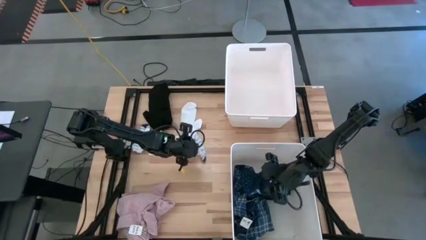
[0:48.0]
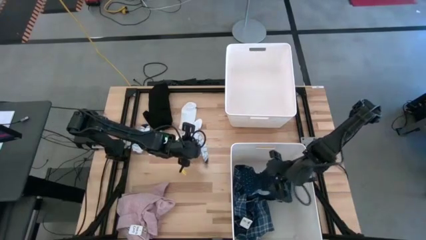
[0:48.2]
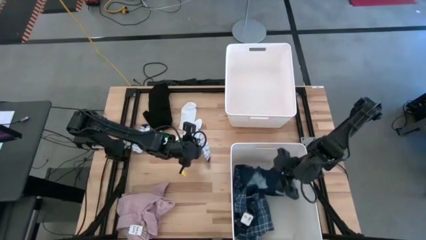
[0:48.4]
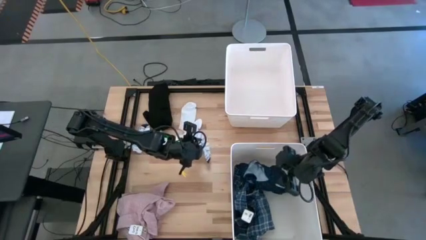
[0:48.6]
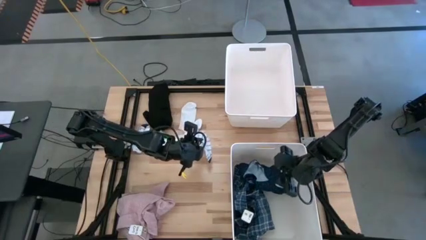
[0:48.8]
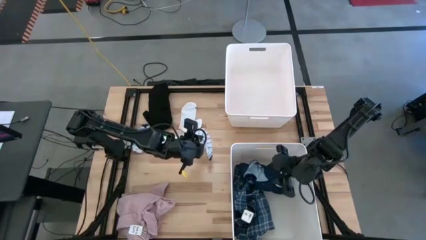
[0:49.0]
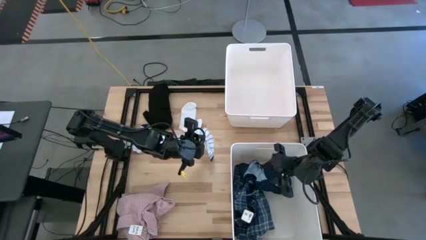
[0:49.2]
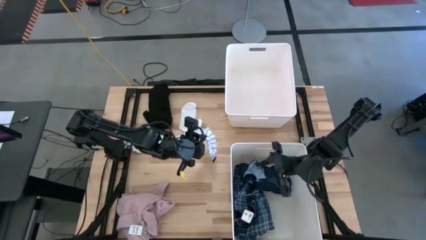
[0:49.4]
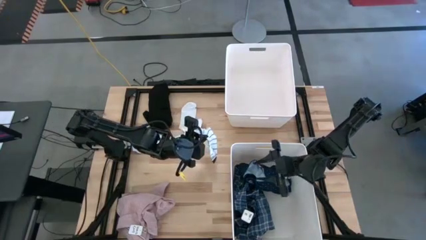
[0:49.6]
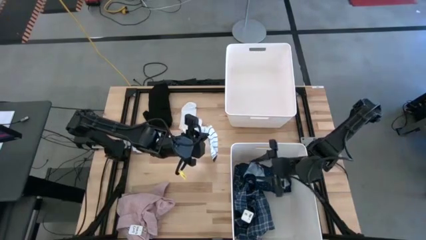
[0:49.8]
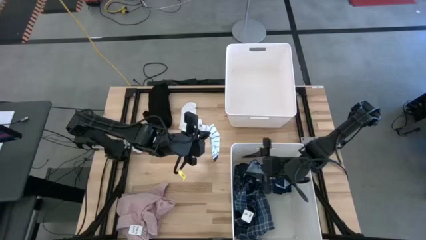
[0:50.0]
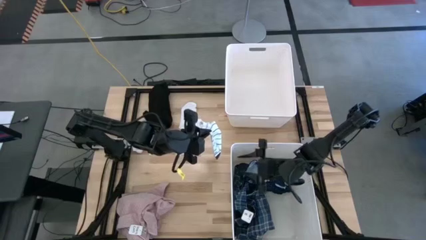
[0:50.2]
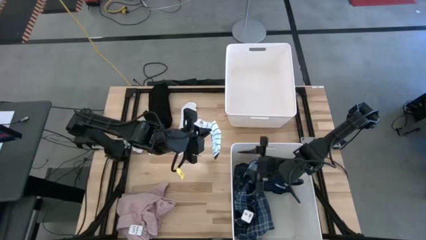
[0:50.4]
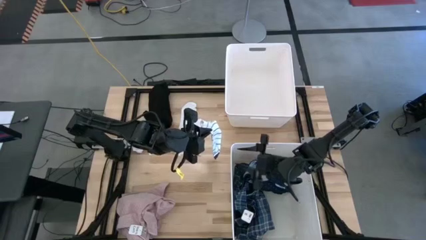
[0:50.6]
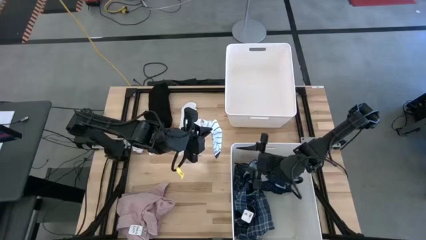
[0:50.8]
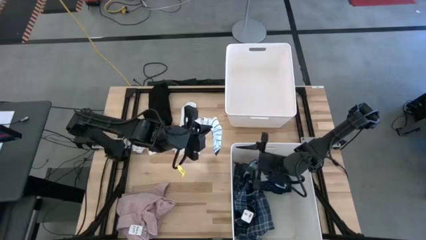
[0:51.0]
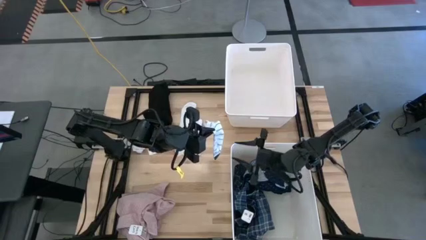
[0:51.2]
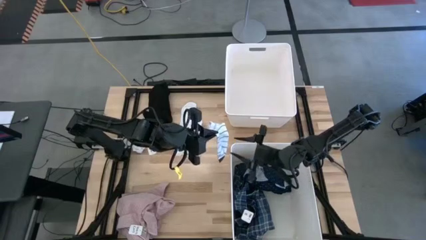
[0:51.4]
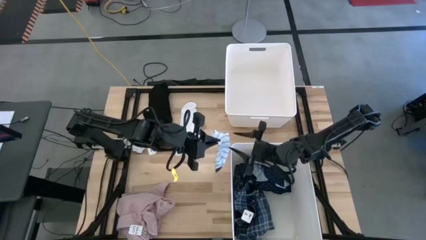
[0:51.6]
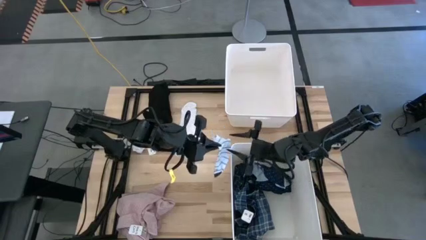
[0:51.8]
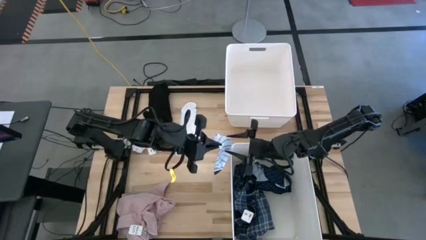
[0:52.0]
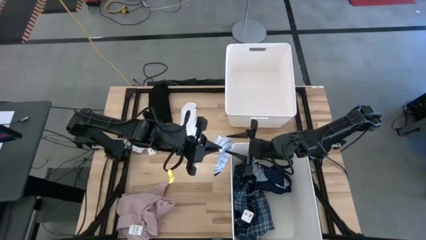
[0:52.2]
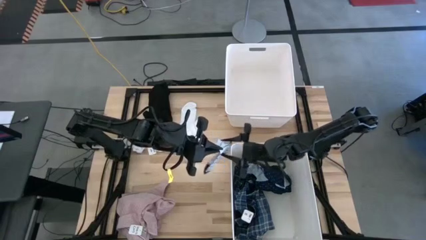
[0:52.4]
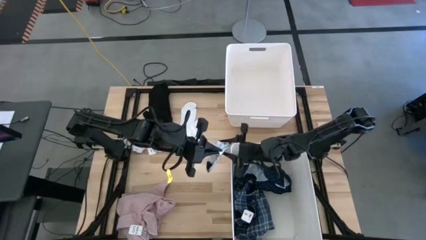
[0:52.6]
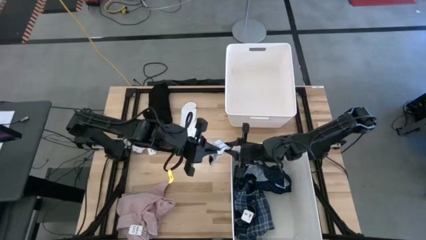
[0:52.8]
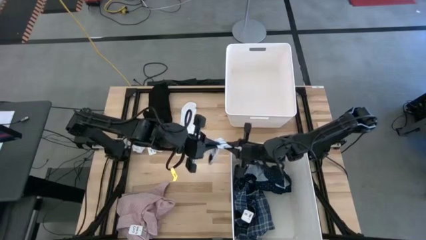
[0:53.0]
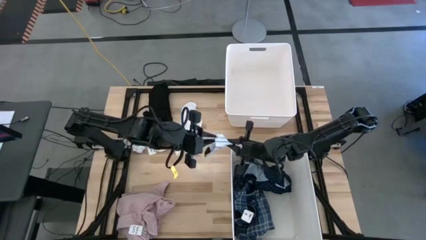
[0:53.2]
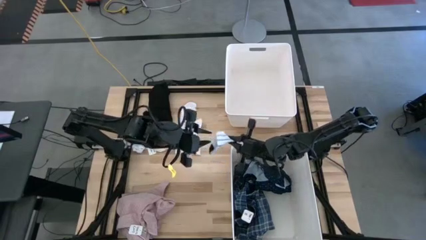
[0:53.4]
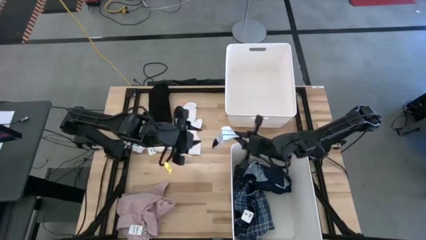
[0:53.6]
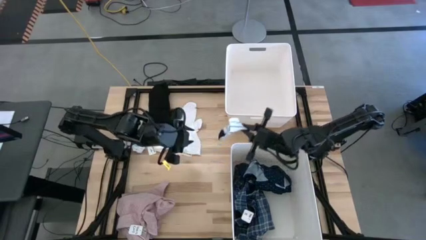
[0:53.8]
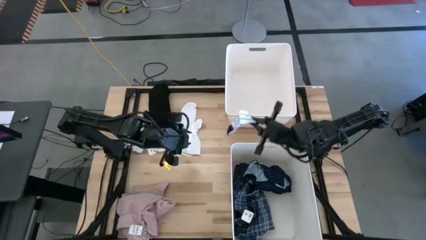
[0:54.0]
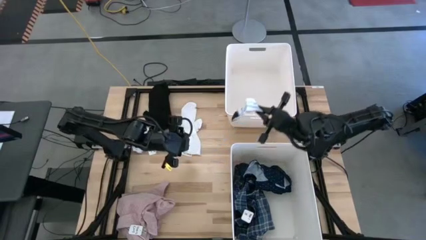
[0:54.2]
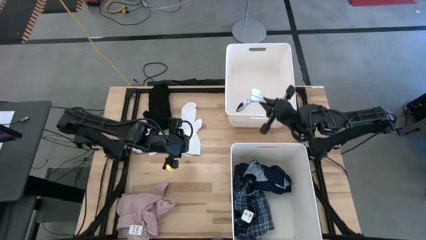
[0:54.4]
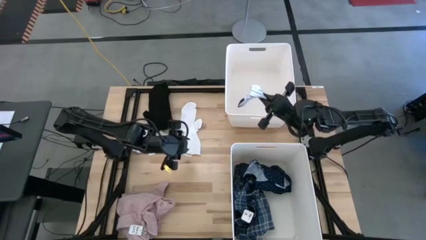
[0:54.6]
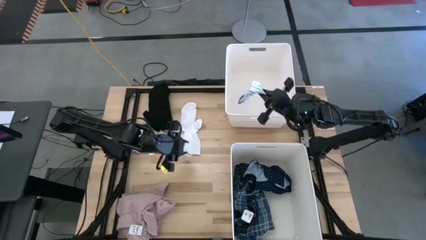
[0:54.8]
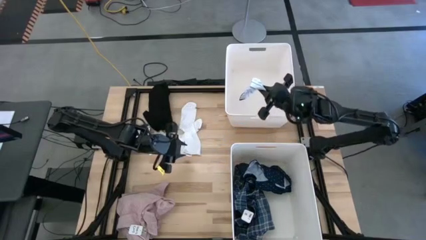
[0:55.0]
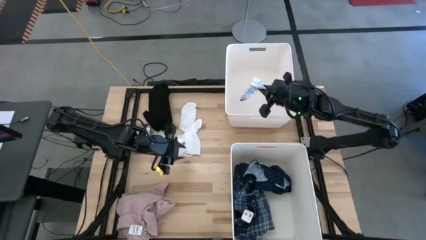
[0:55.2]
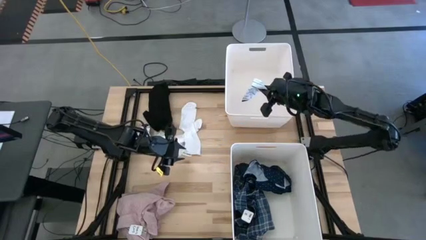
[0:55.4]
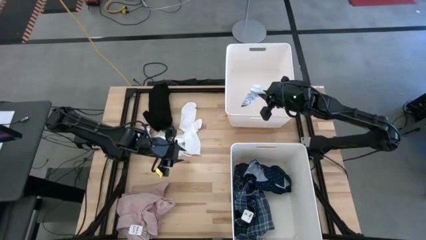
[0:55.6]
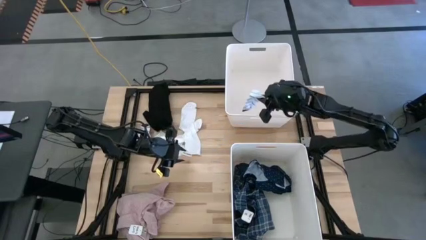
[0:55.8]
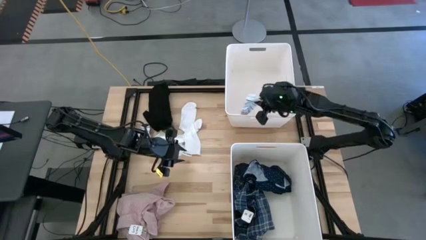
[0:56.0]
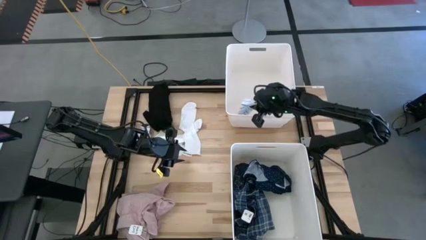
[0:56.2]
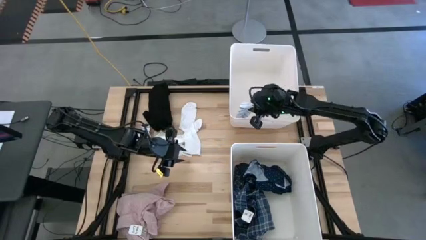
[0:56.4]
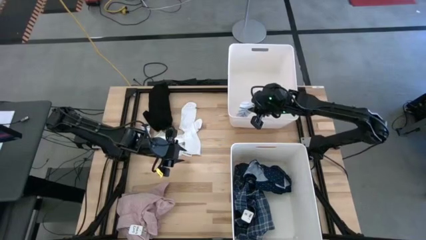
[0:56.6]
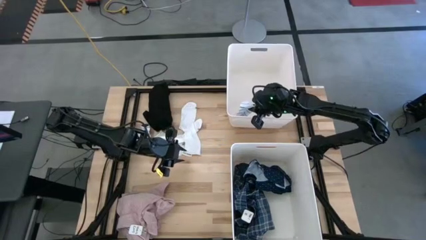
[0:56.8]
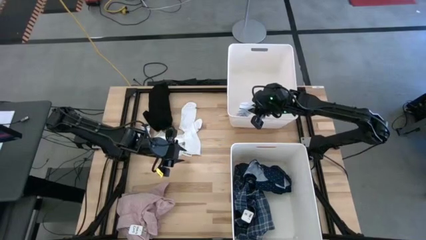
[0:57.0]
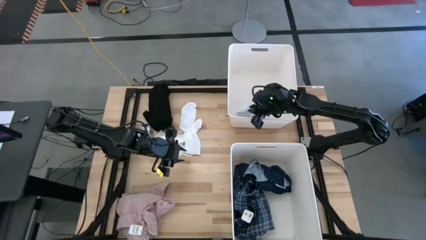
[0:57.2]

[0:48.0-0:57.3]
Task: Sort clothes
Put the white striped sock into the top white laundry bin

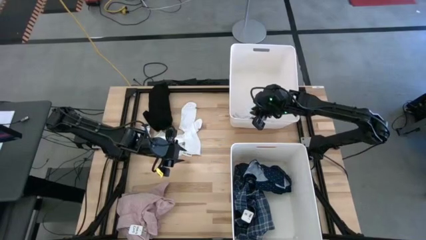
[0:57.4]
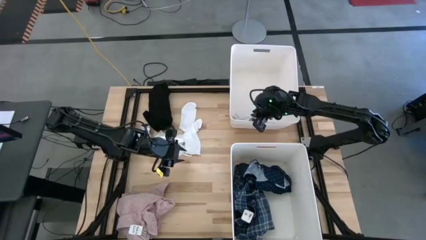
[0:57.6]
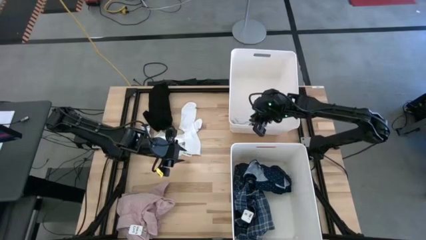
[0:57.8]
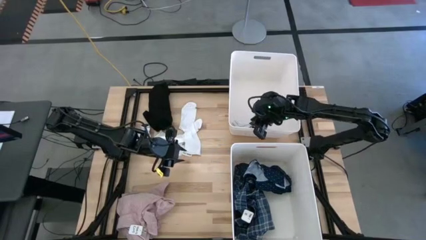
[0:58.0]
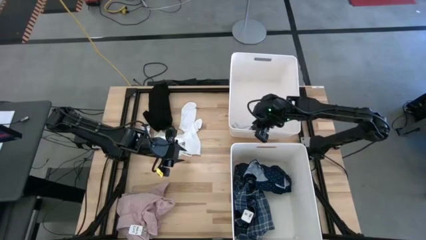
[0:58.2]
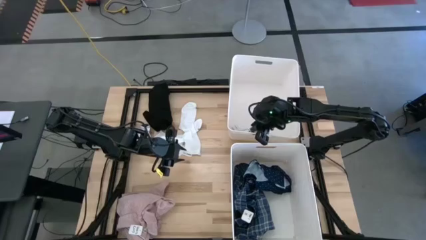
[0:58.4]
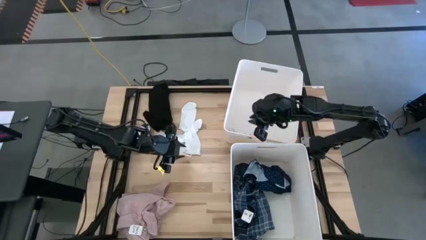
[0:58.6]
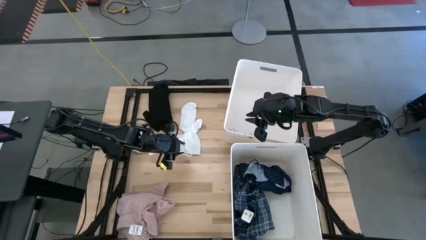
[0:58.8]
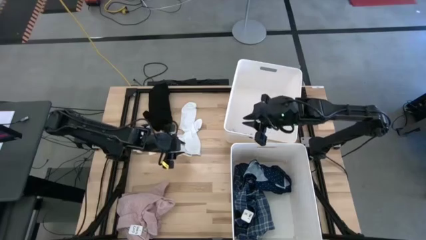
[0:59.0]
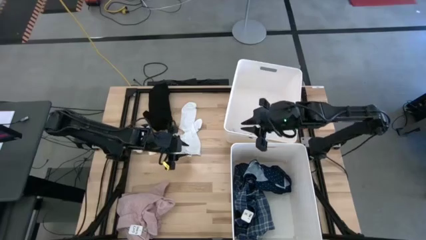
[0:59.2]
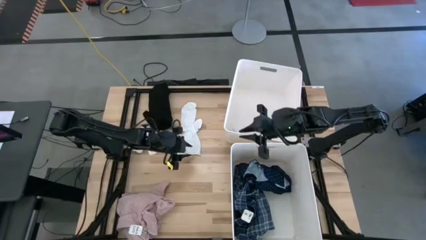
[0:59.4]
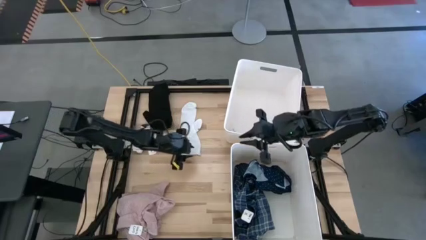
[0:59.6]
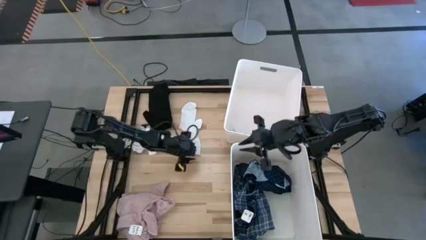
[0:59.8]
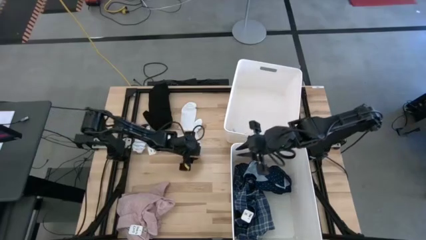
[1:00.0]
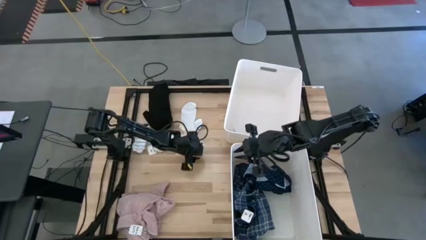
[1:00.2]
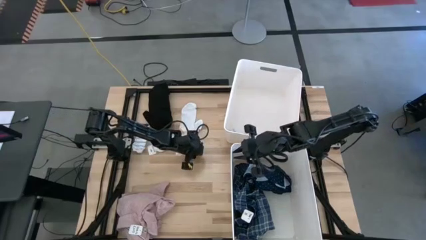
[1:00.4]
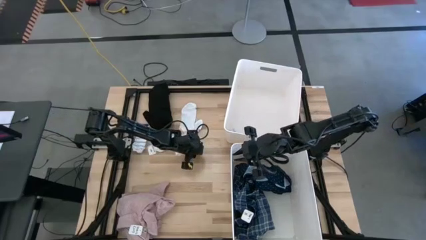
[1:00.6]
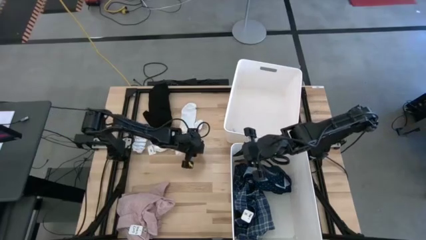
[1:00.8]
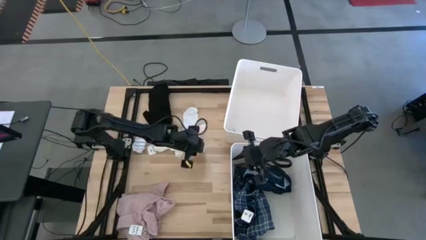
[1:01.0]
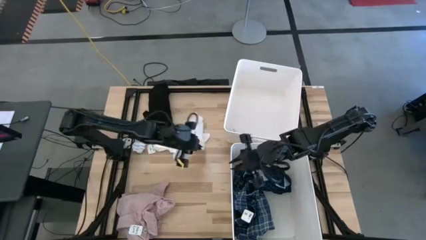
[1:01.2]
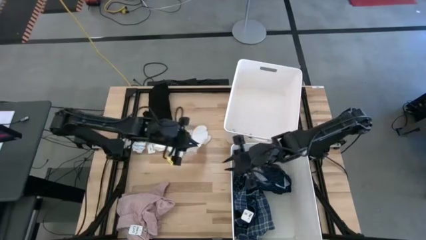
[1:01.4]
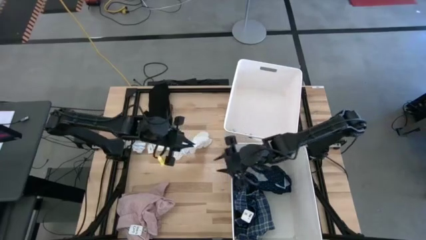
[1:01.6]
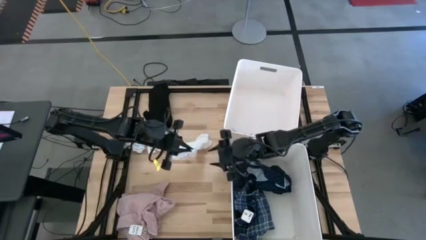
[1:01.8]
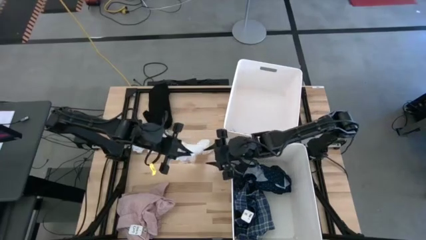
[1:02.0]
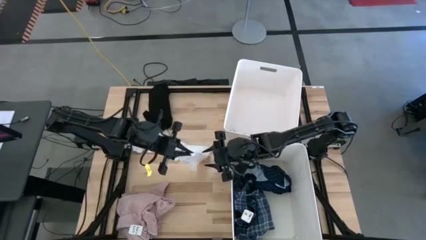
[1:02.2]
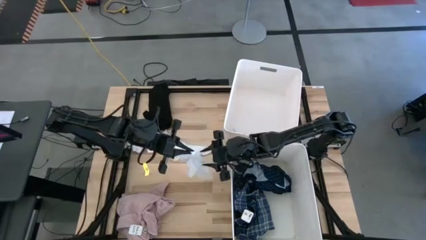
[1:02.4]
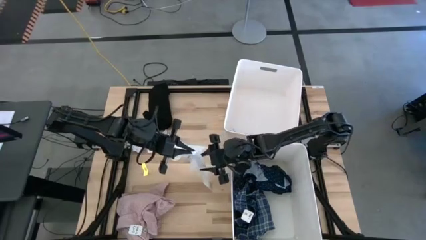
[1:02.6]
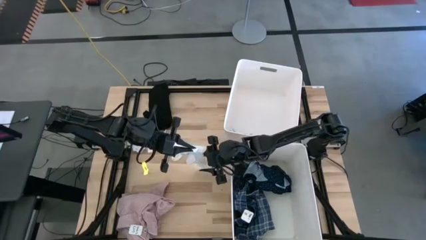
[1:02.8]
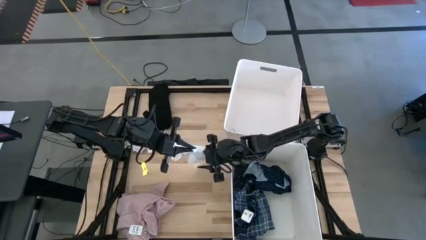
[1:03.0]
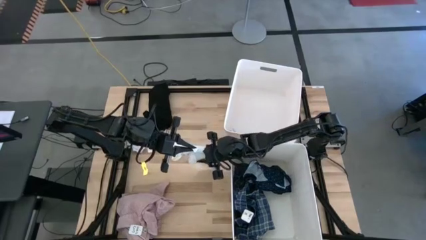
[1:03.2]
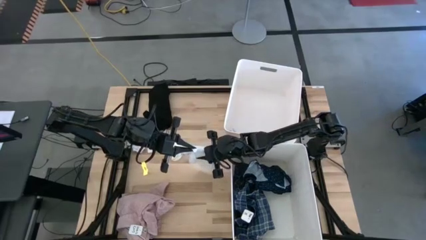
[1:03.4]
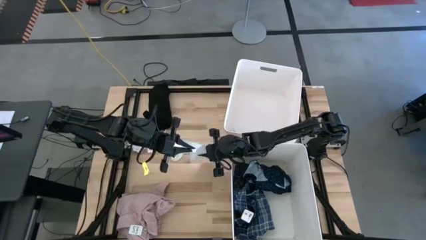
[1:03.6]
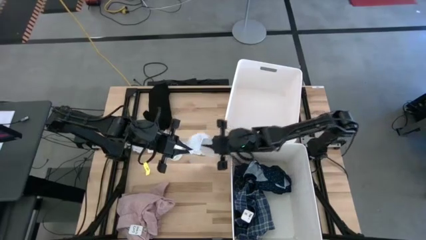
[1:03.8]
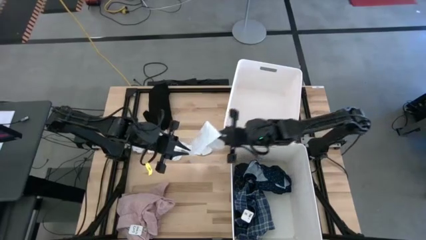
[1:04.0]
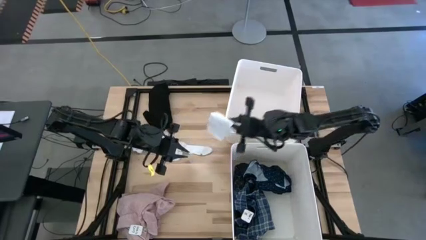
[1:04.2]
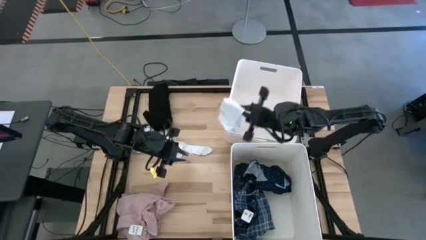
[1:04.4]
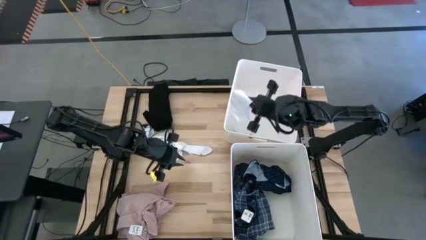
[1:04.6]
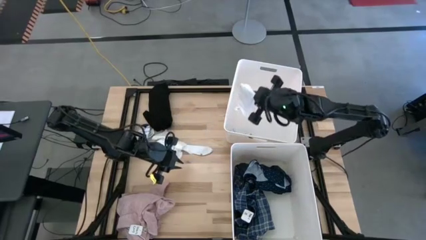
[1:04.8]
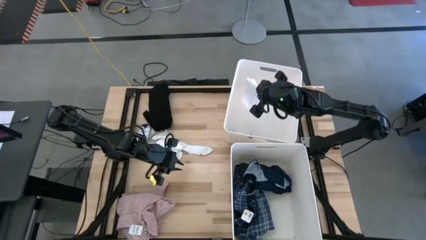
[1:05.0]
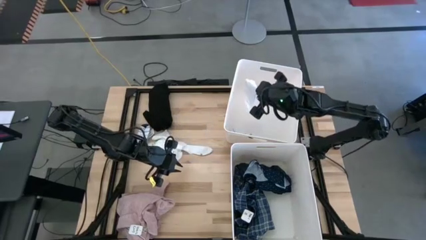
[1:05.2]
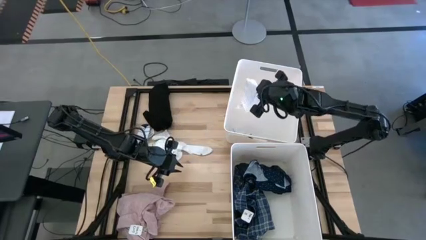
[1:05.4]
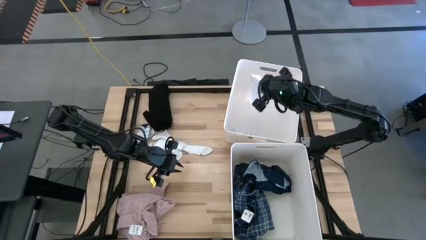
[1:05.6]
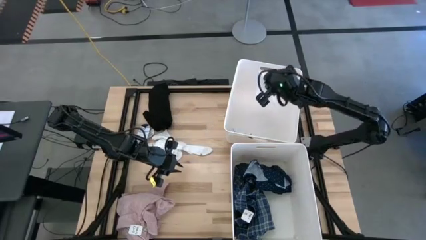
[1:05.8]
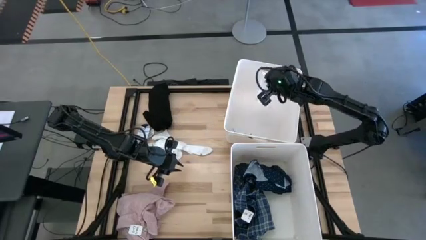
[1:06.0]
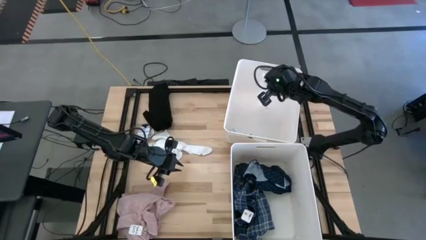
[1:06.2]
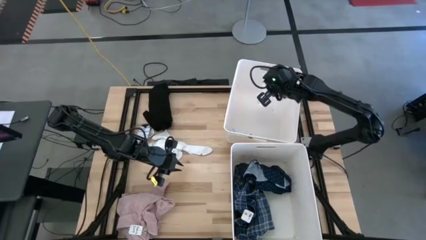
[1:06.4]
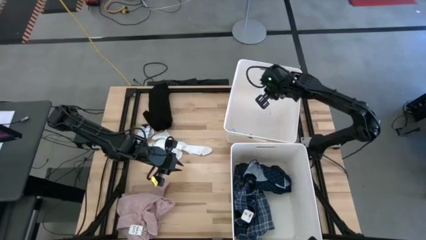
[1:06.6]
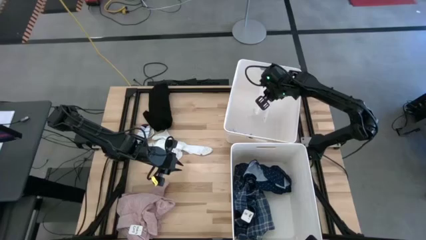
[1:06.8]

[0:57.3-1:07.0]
Put the white sock into the top white laundry bin
